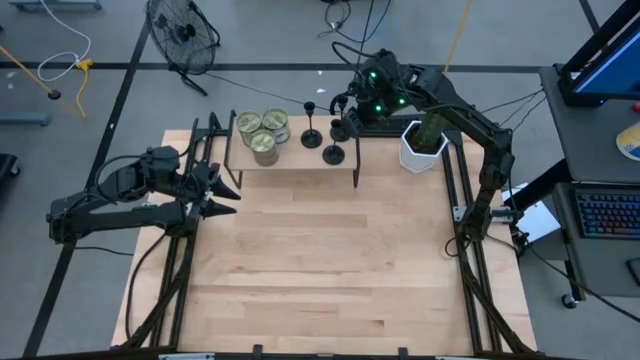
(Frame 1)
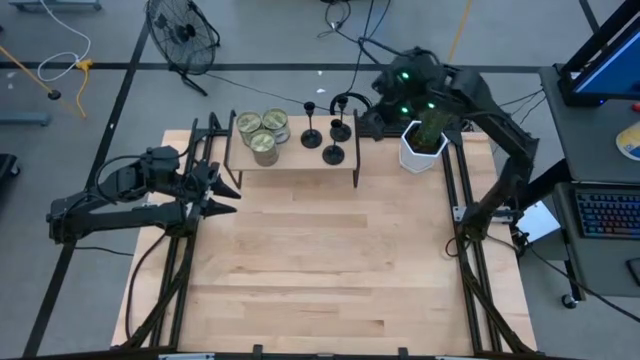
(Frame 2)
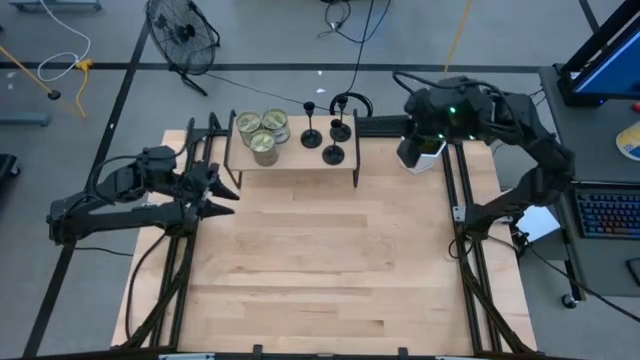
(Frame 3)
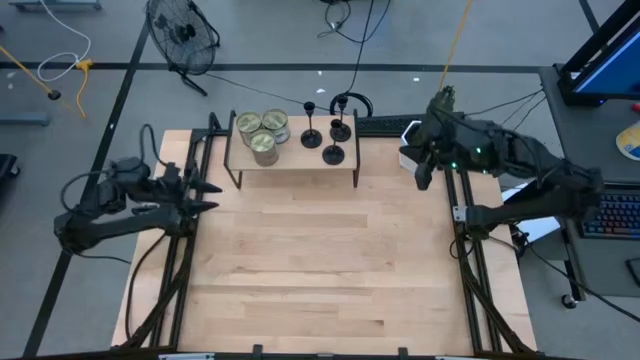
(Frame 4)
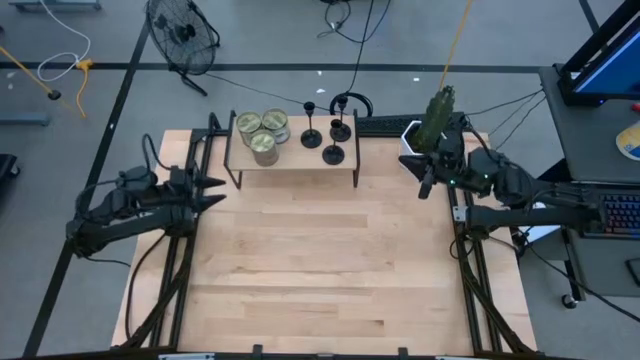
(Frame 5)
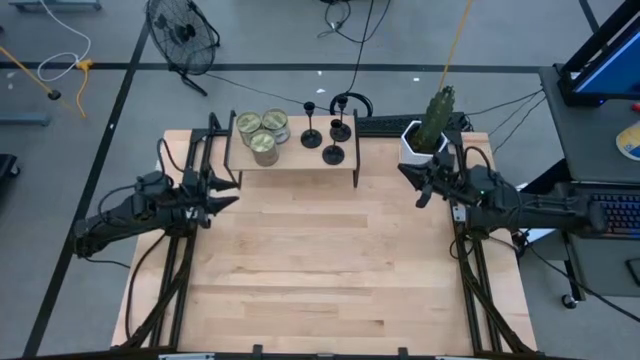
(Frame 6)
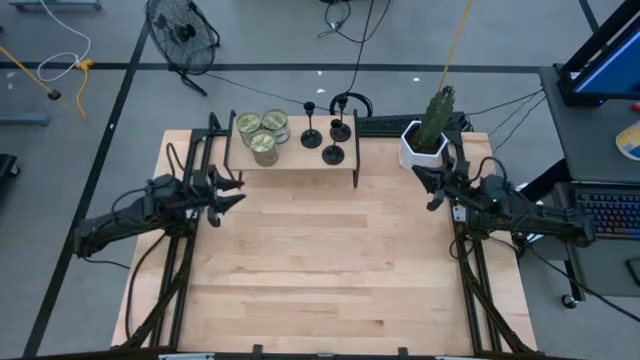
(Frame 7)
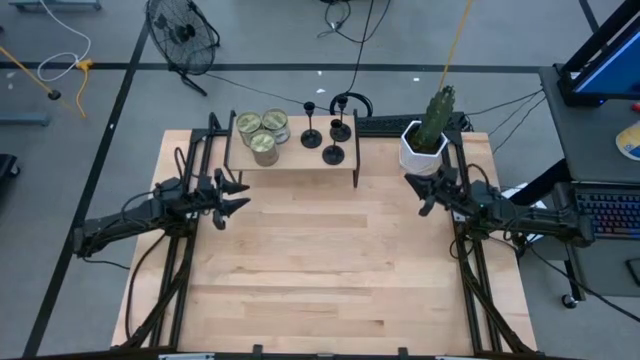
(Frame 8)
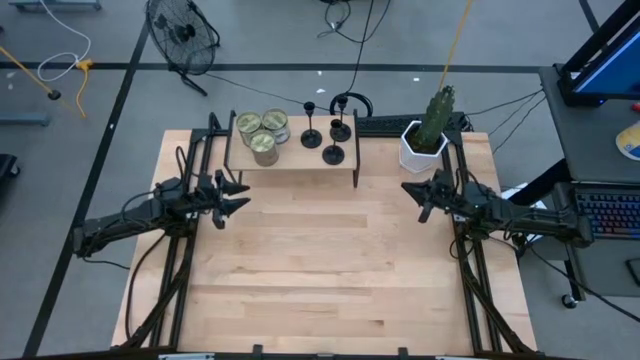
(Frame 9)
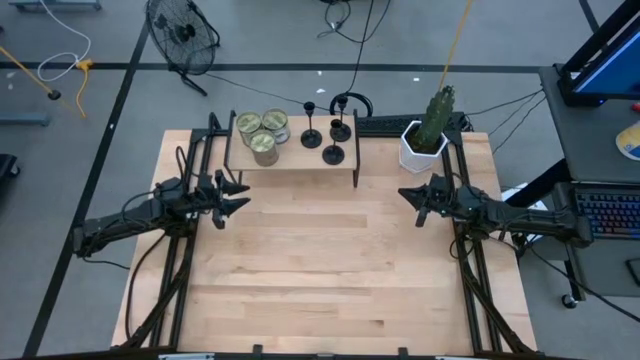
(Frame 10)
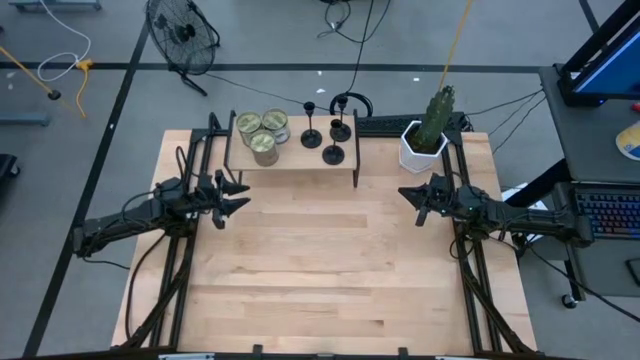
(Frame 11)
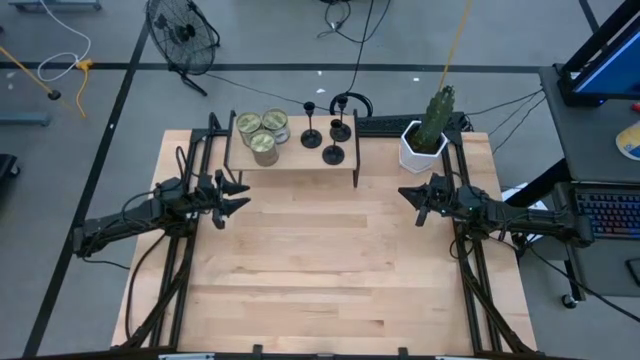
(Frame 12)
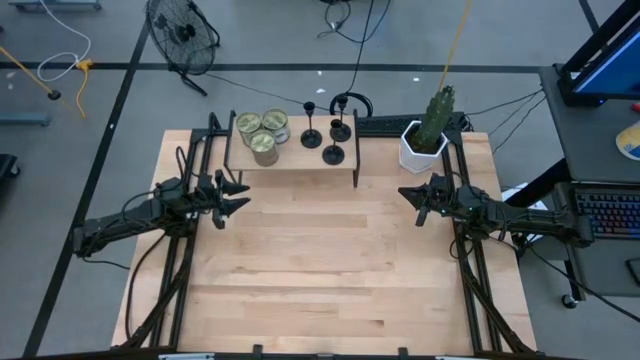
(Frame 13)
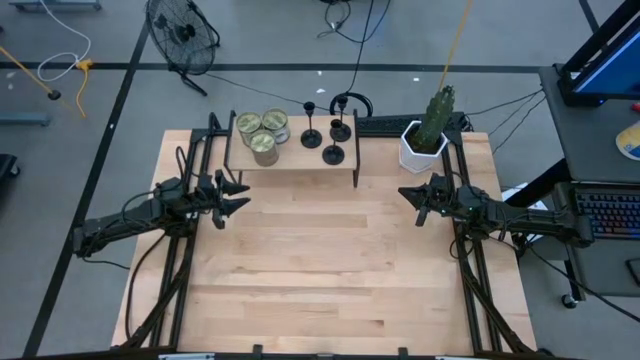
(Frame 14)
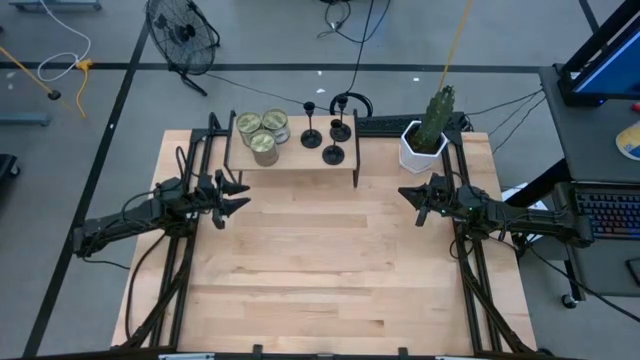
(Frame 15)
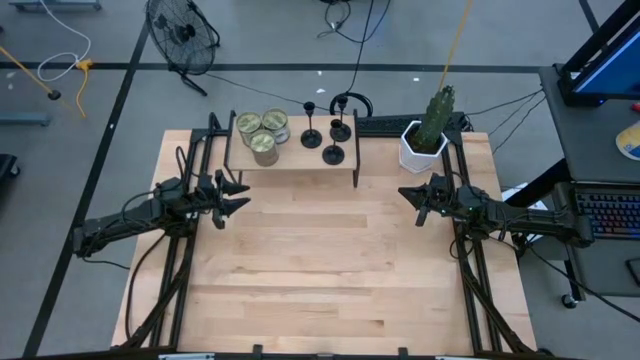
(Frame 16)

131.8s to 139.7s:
Task: Pick & Place candle stick holders
Return to Home Position

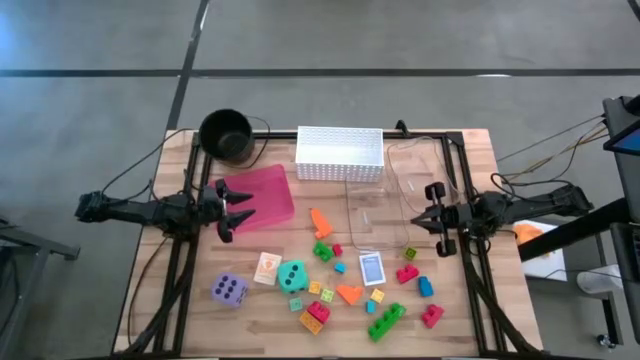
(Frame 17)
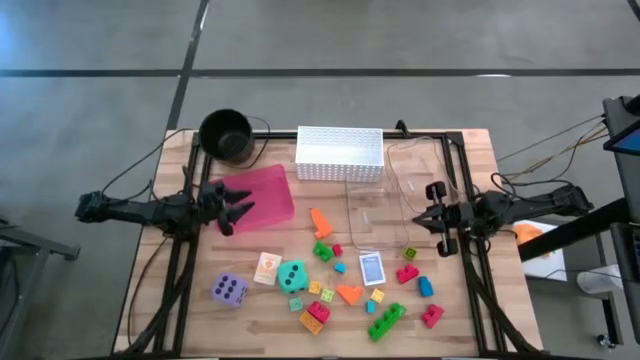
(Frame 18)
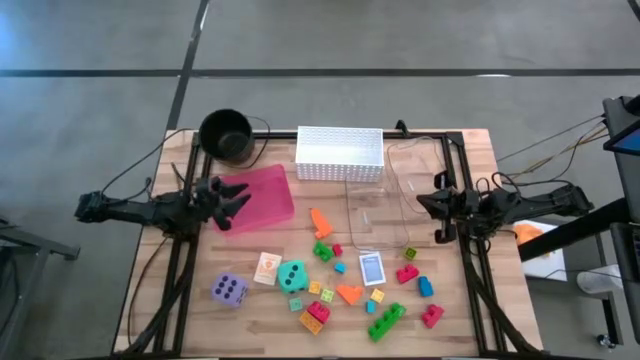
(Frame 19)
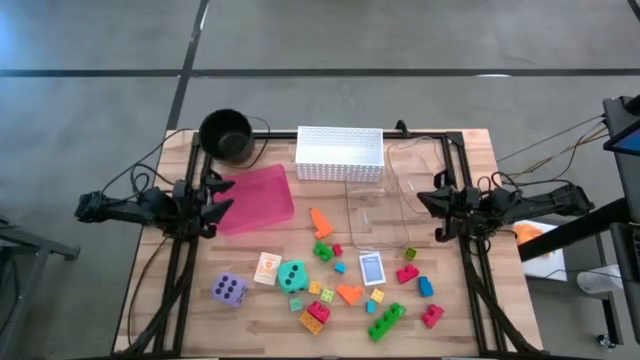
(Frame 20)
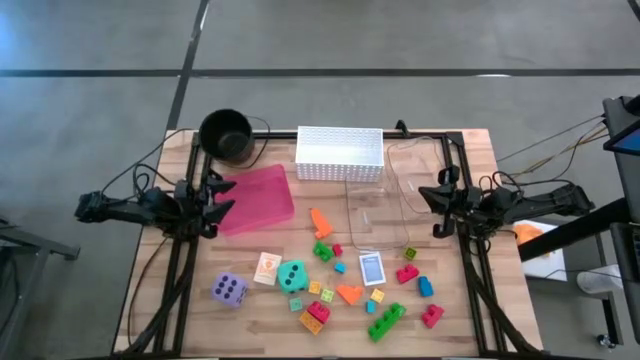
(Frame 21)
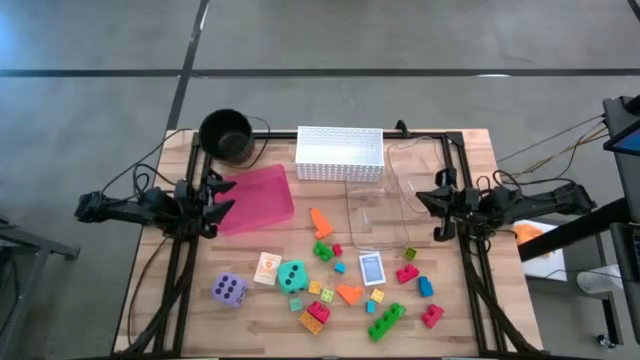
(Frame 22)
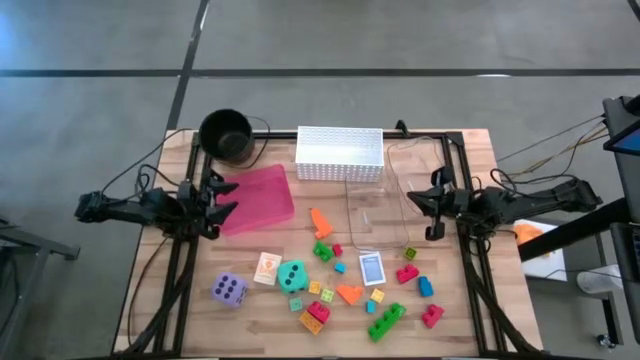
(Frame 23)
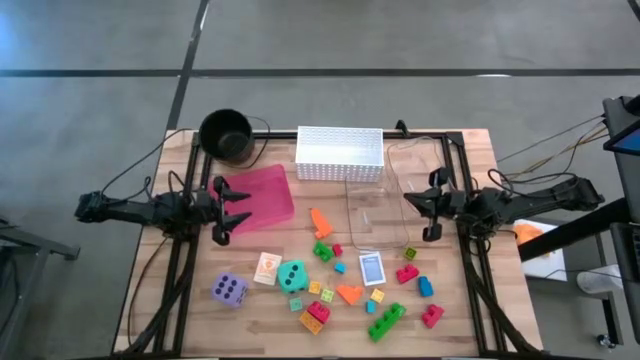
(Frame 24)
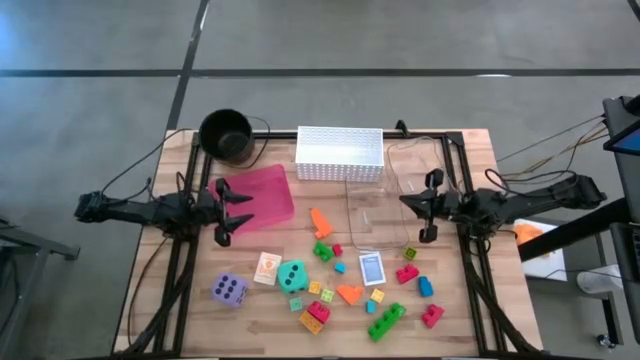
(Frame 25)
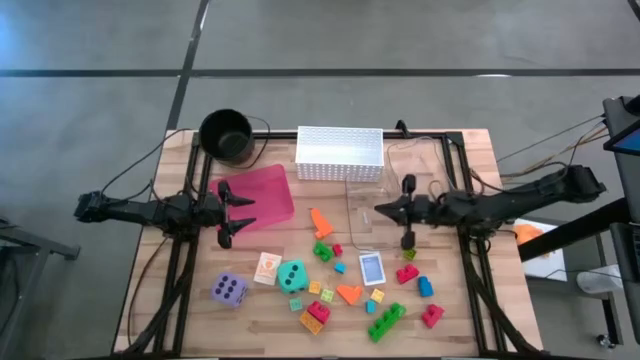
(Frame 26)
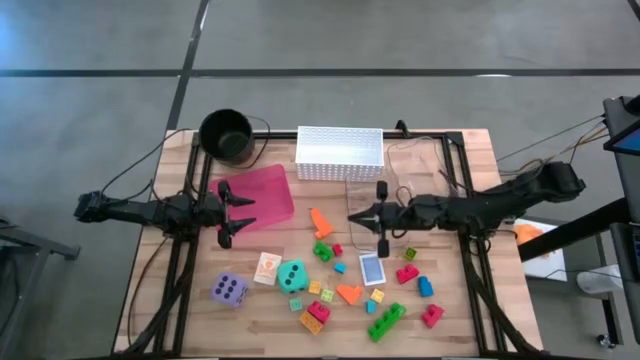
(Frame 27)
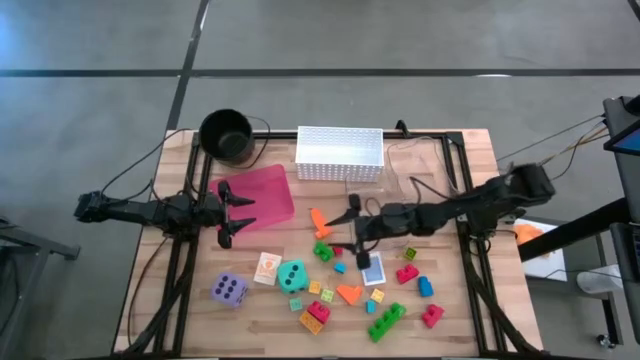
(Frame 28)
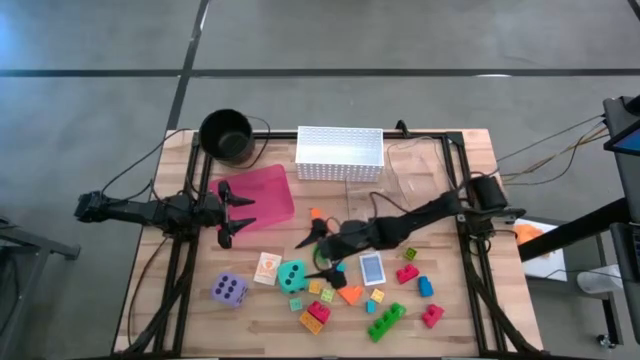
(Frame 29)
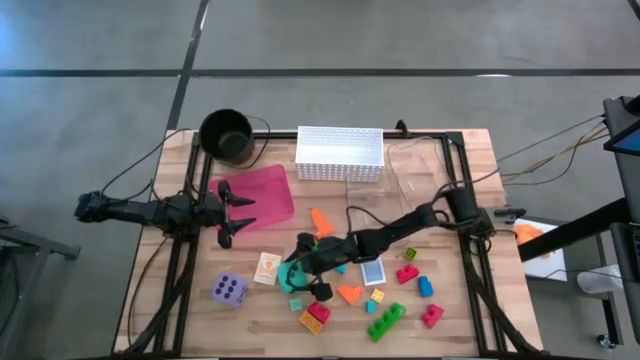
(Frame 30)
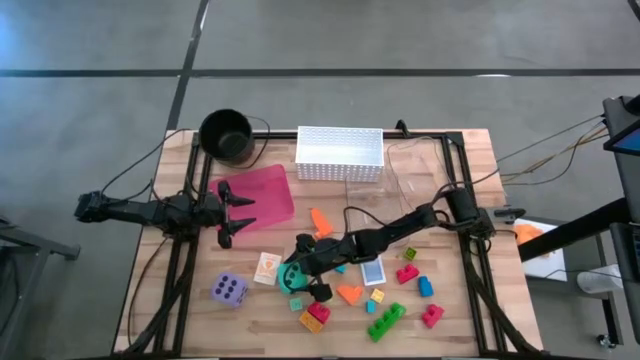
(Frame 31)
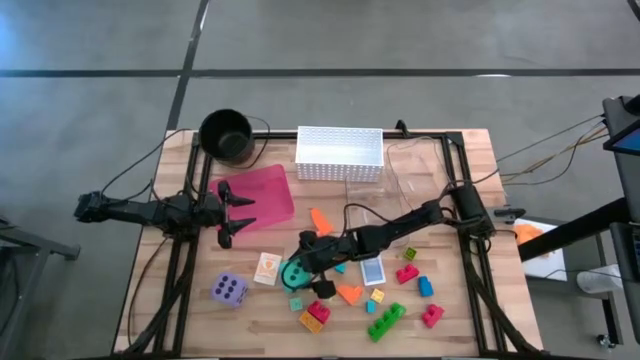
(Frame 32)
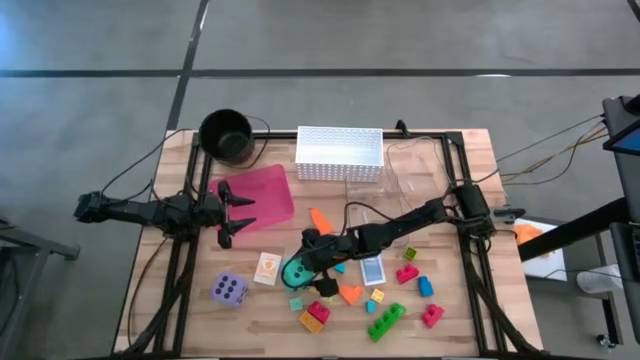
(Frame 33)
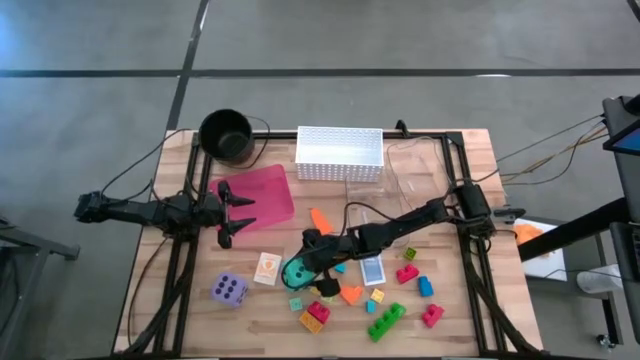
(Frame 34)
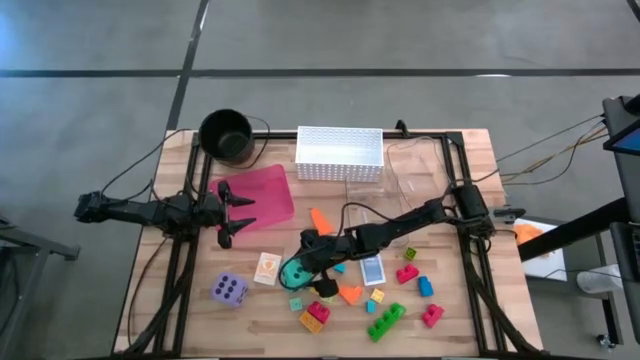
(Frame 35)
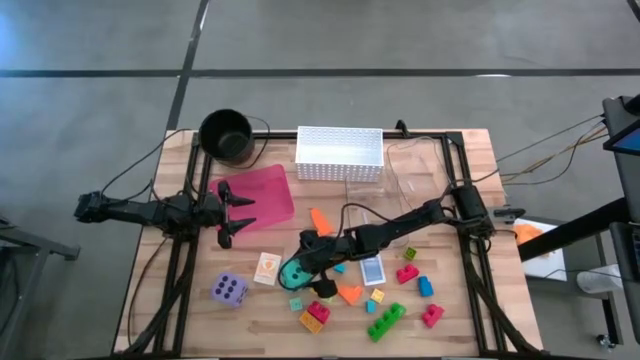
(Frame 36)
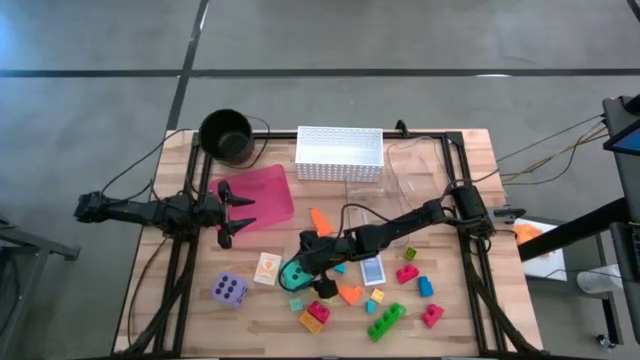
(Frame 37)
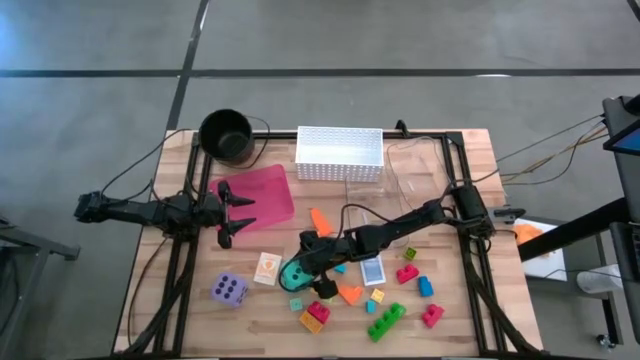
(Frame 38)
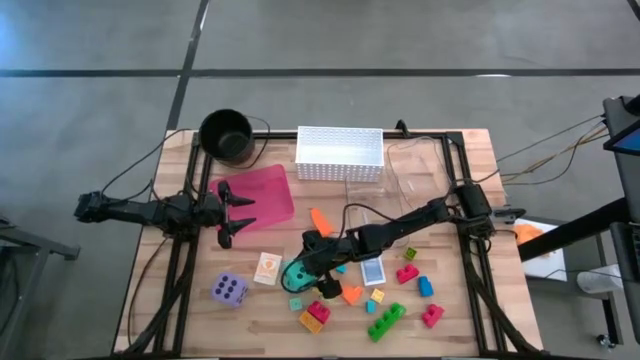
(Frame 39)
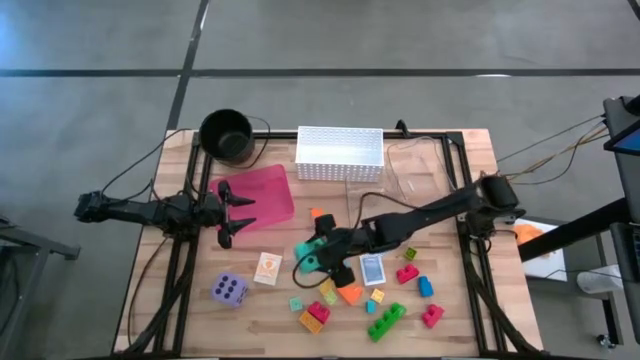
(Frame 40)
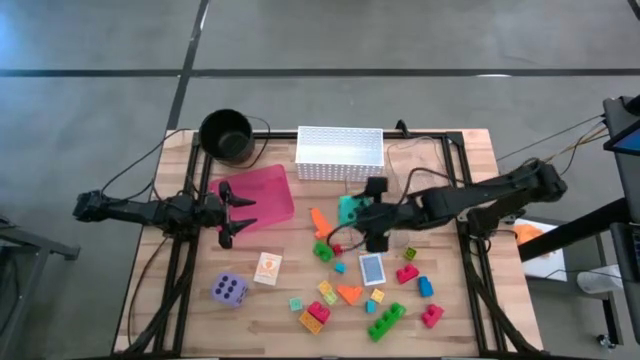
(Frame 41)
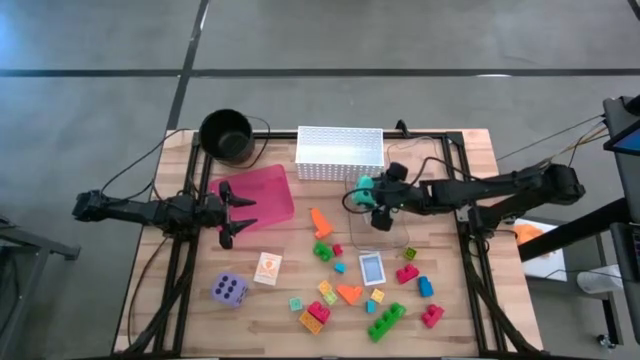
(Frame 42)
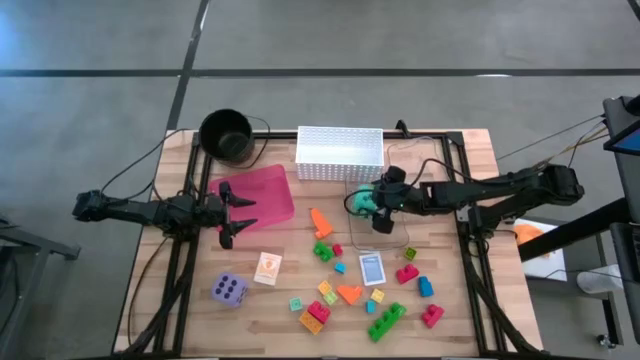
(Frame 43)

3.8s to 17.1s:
Task: Pick & Place Toys
Put the light blue dice into the left transparent bin
